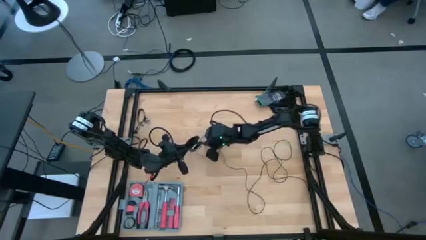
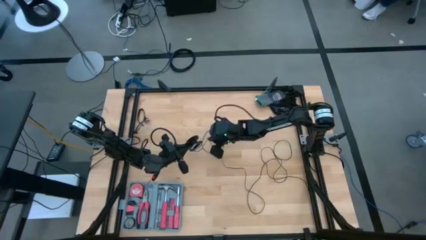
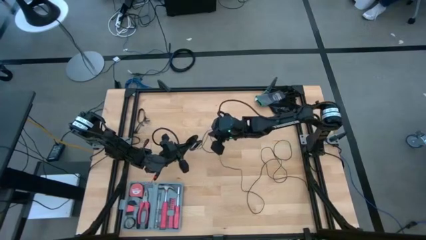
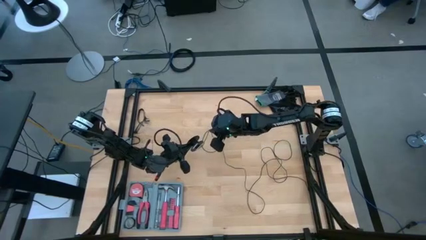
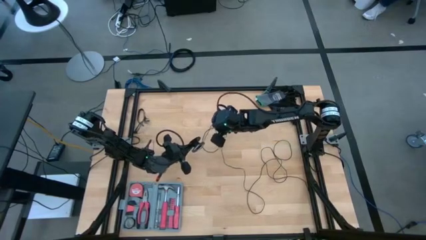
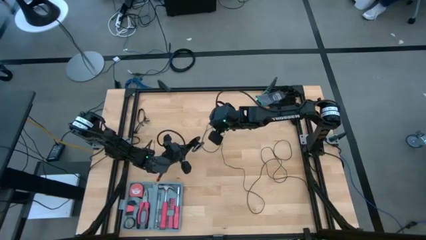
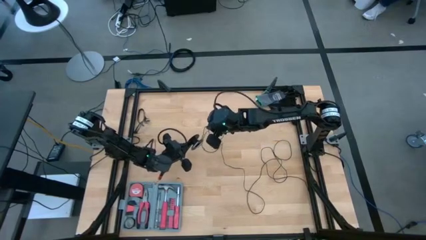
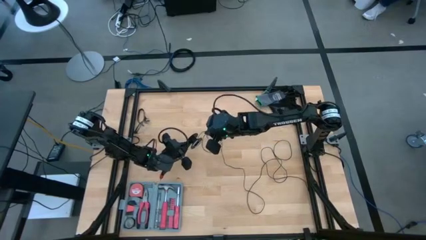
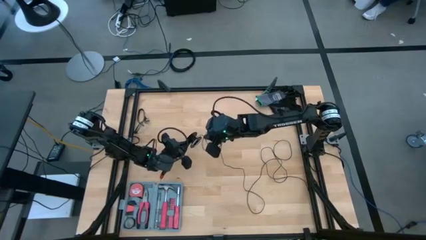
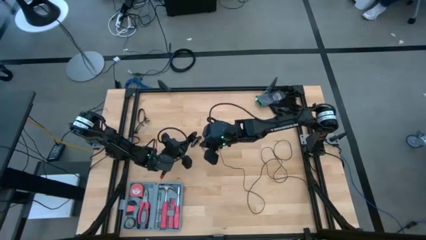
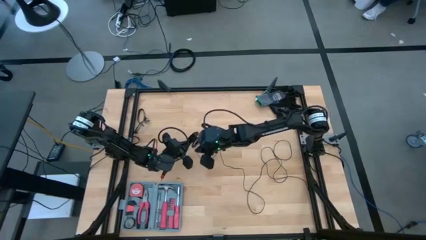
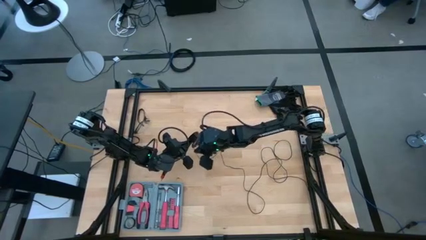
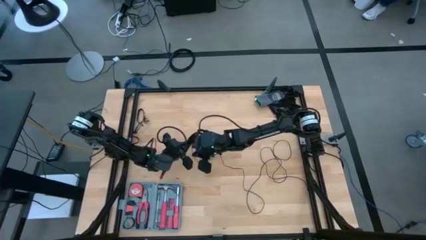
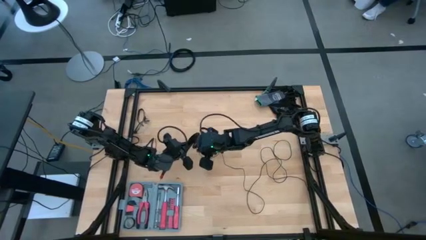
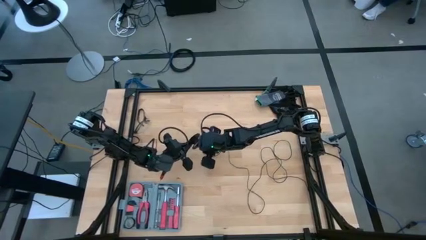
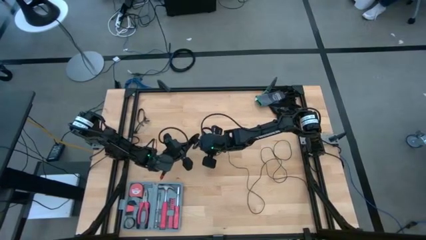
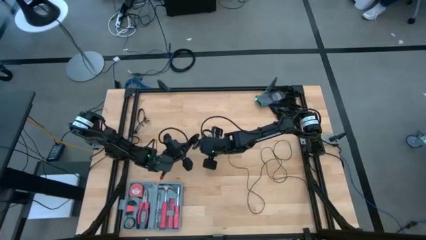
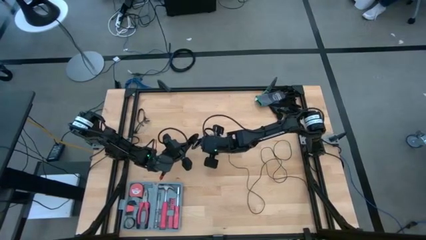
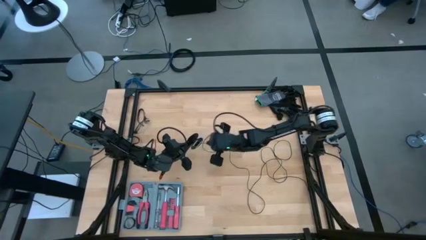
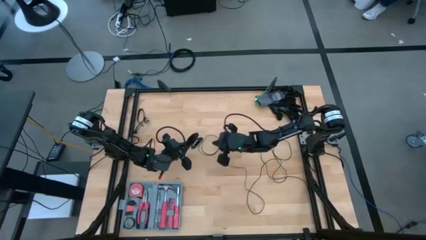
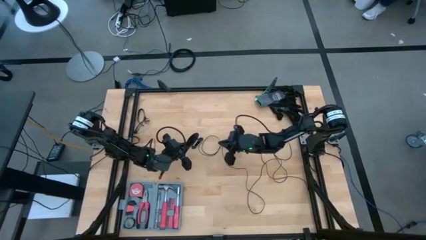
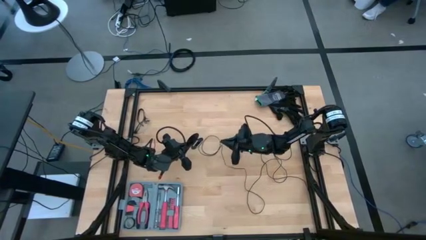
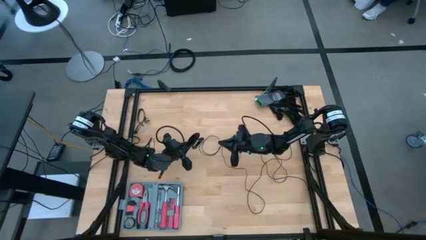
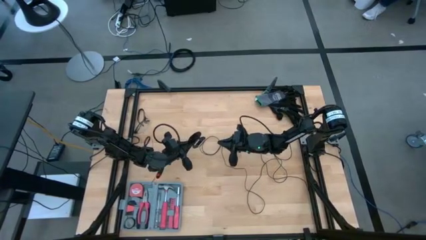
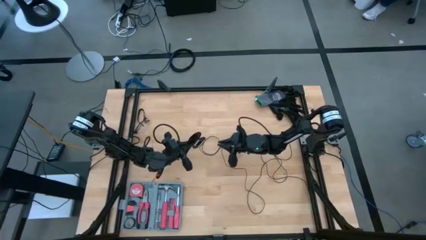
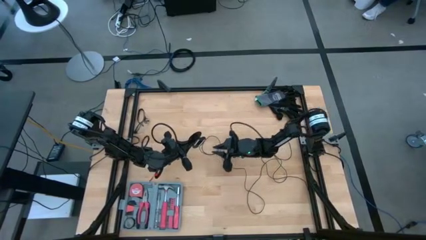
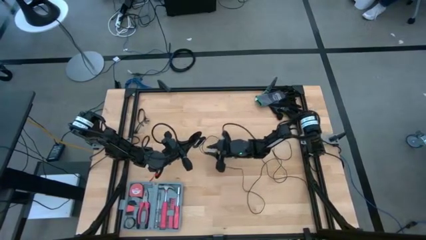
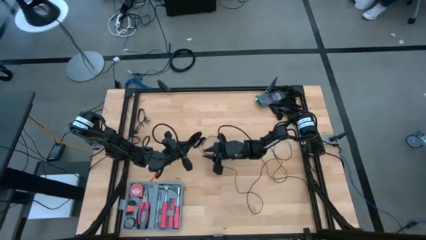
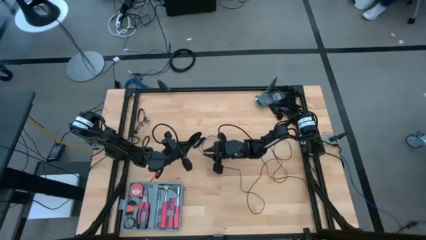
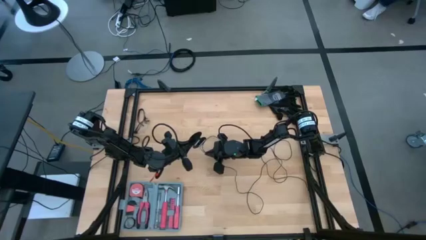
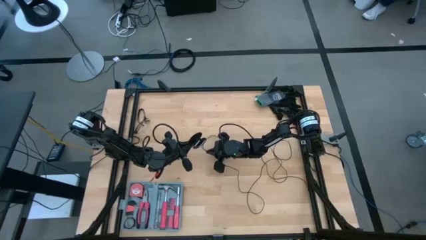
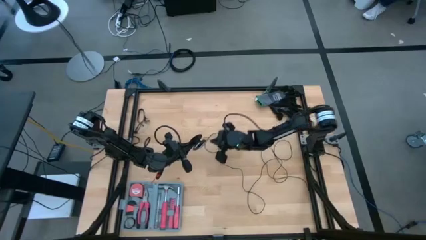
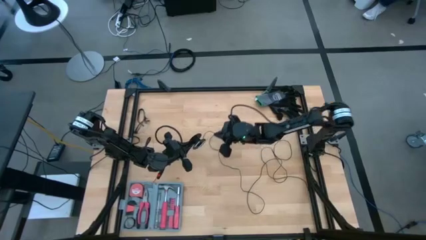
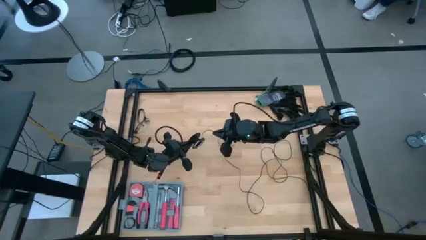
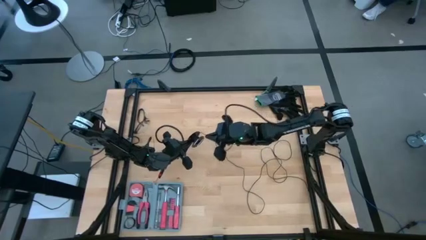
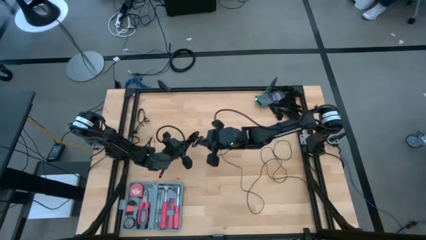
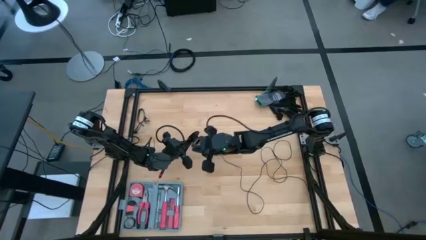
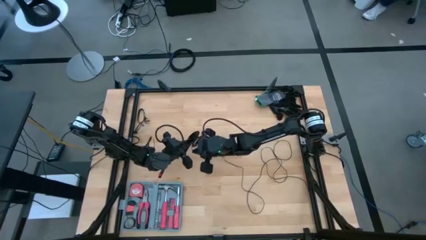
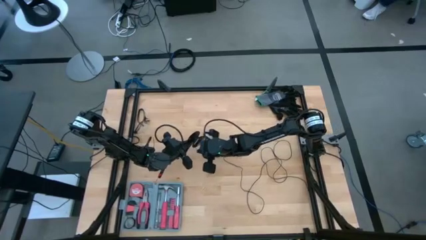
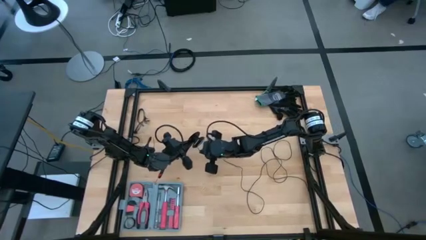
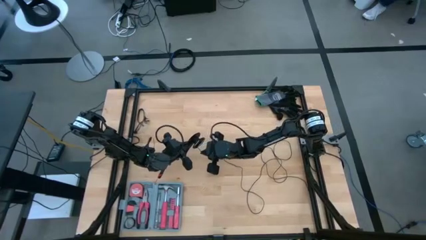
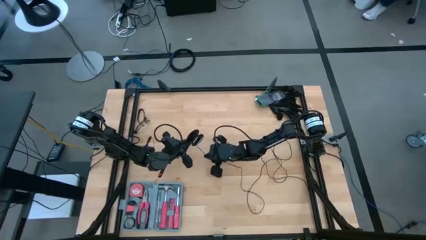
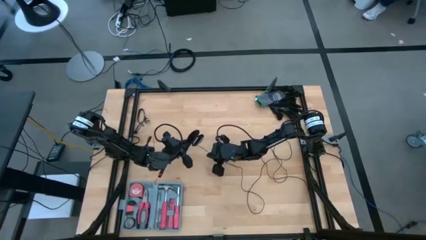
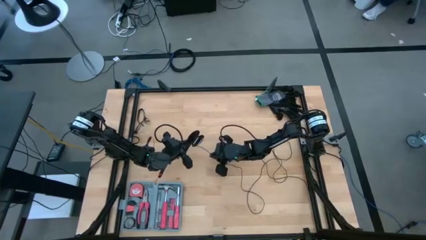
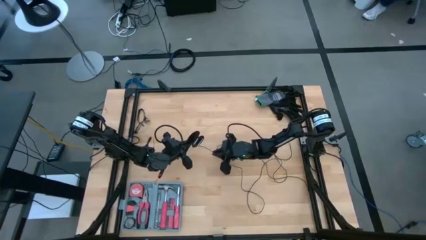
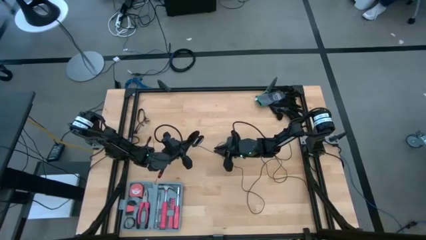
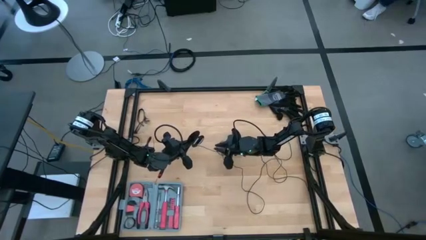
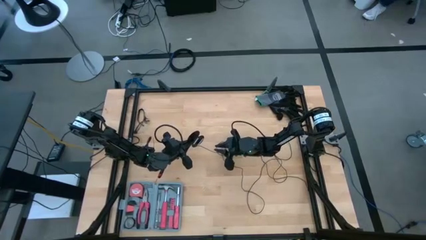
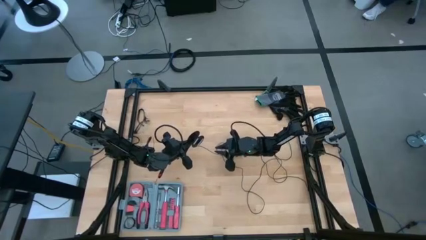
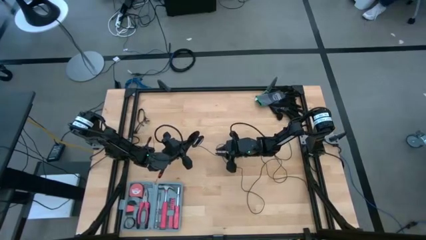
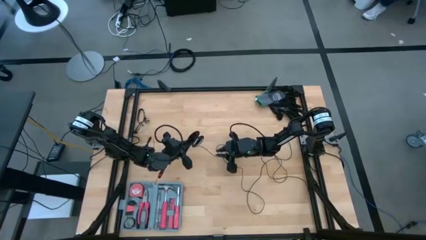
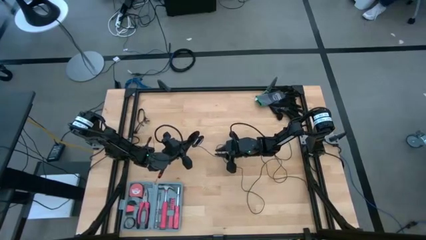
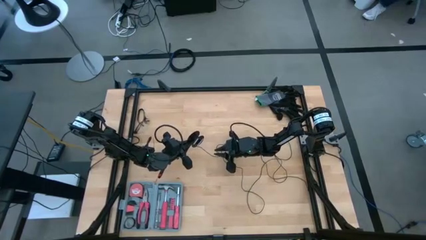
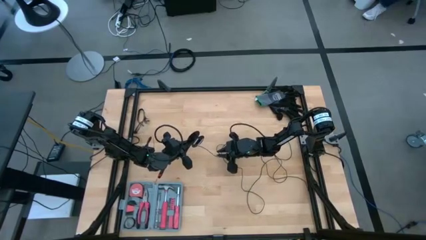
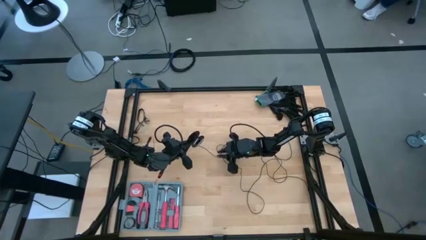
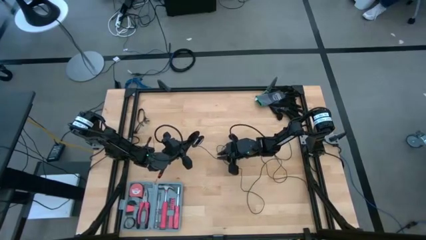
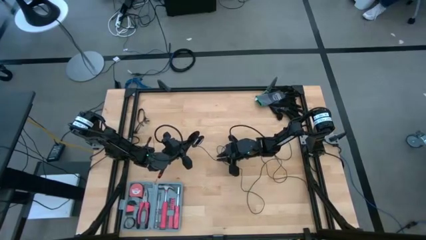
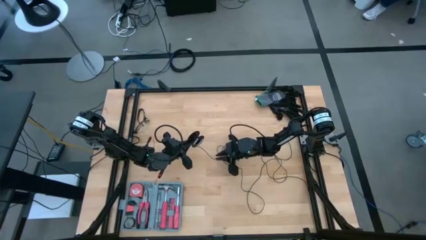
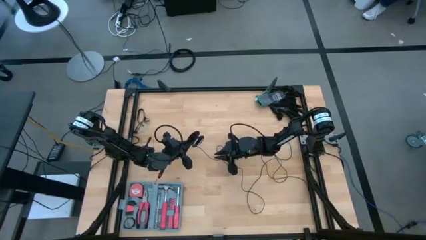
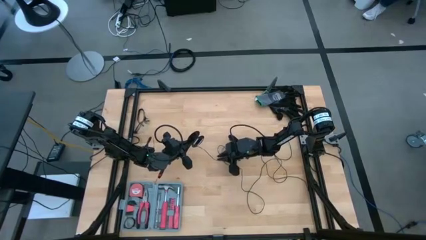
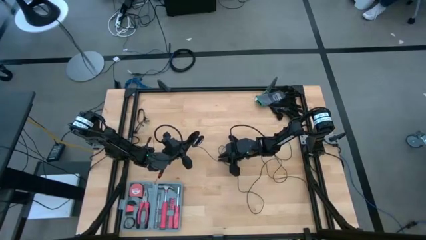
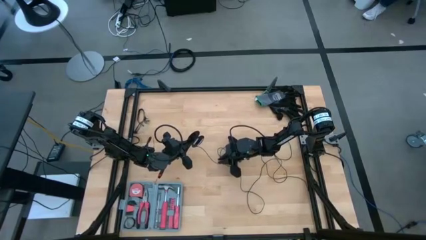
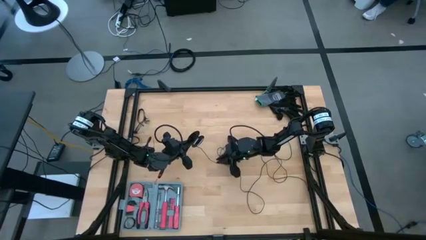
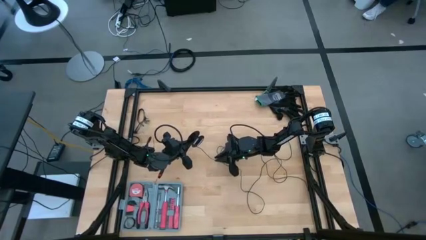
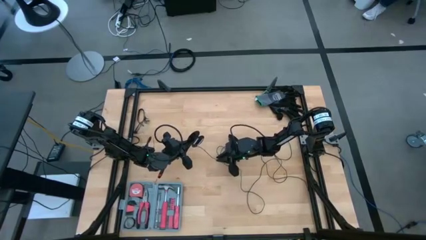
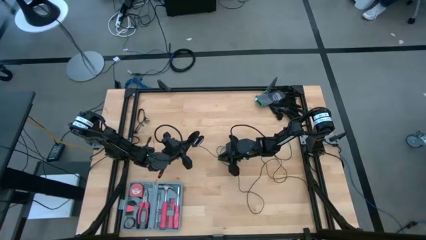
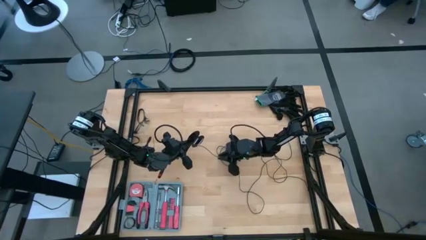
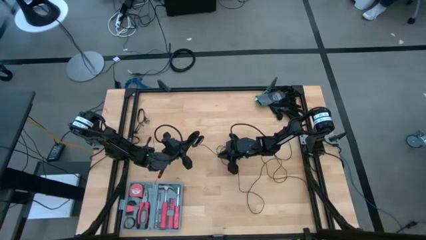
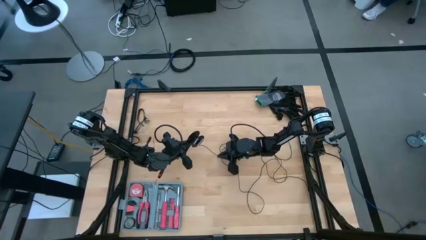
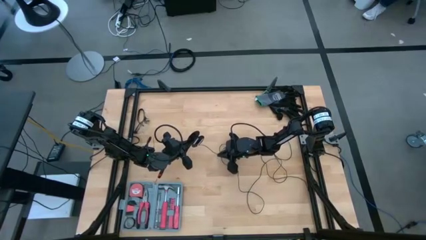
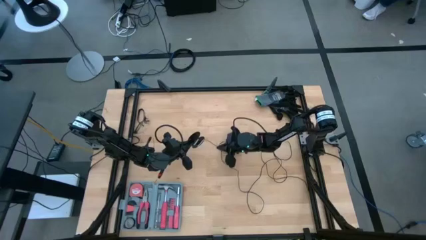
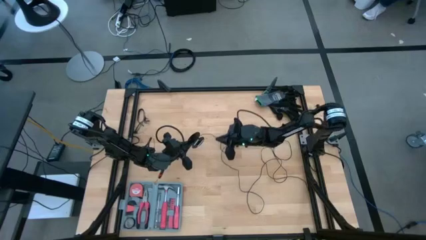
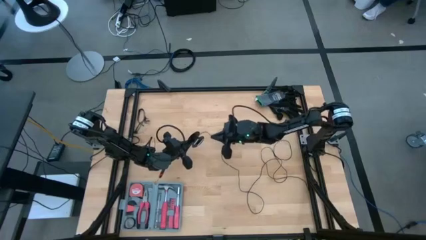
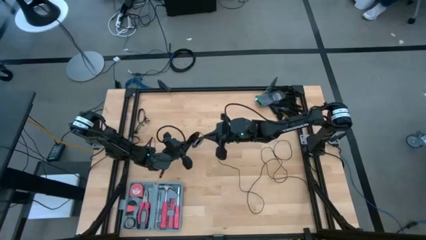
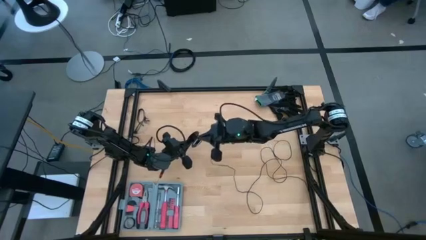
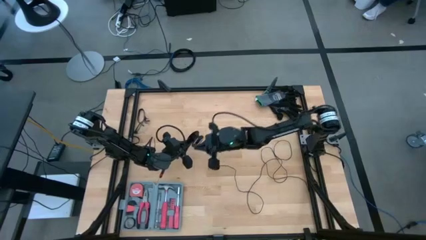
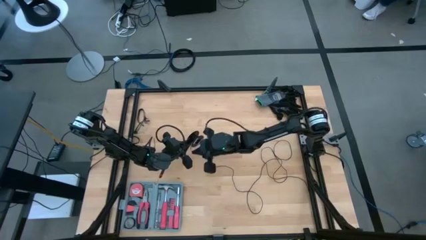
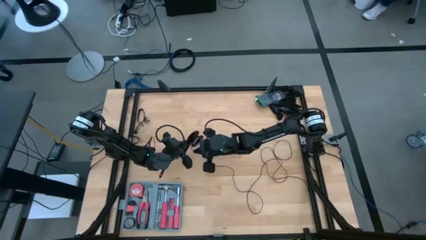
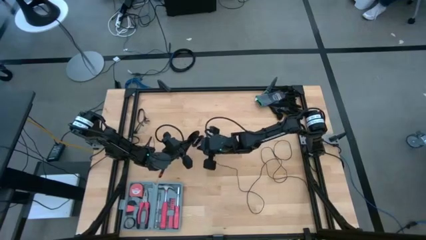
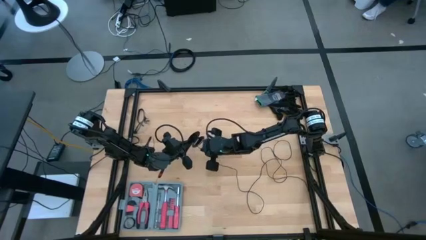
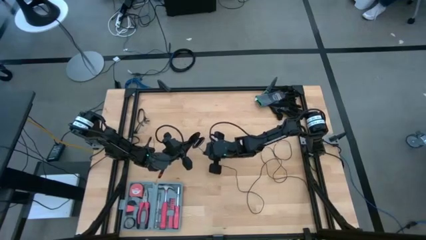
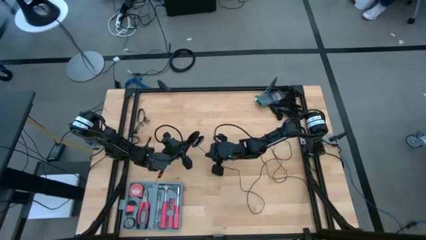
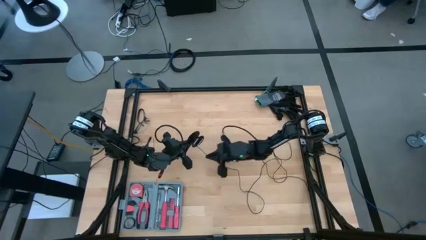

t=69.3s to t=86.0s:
Task: Coil cords
Coil the black wire onto the spool
